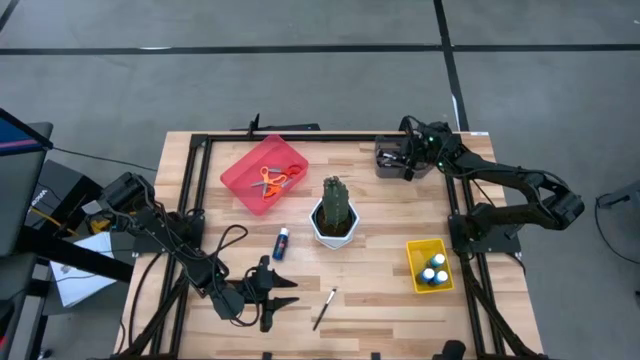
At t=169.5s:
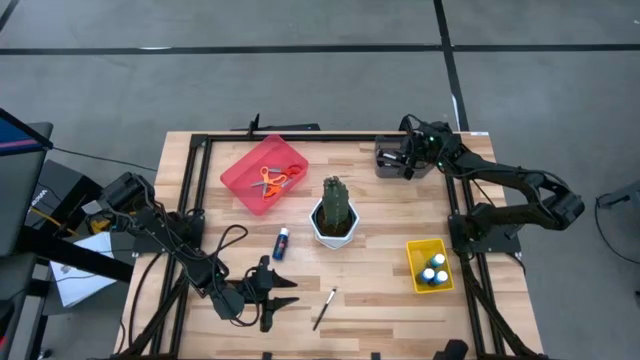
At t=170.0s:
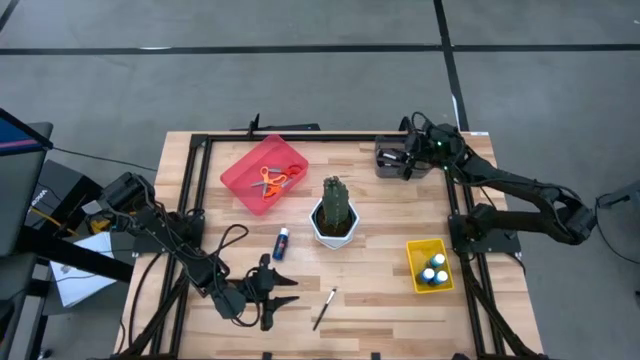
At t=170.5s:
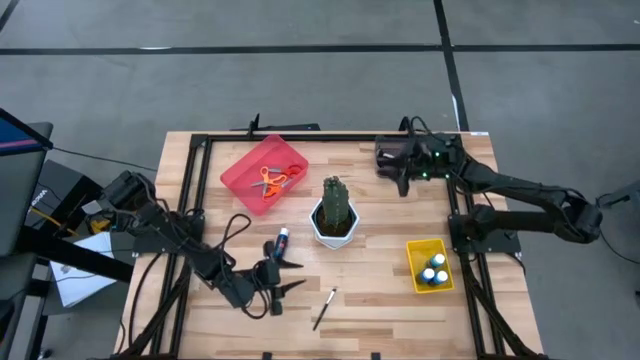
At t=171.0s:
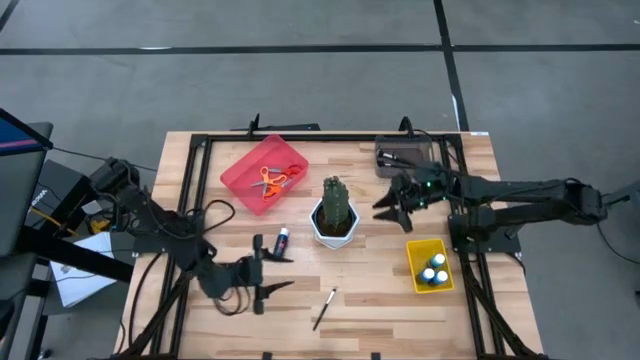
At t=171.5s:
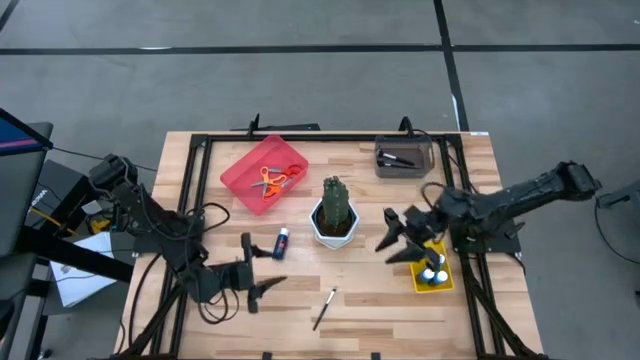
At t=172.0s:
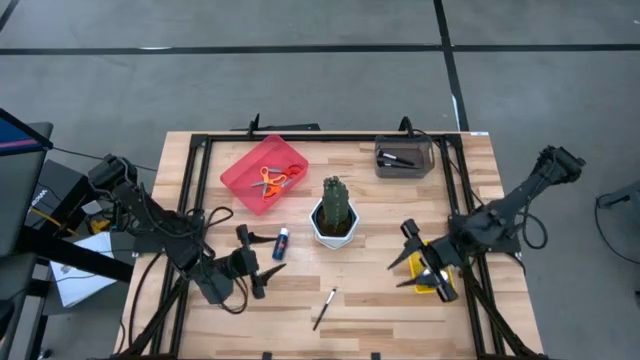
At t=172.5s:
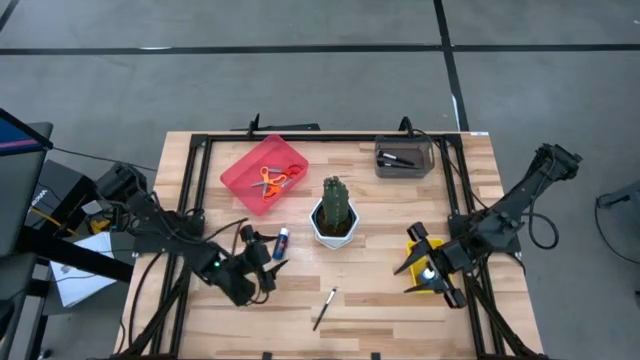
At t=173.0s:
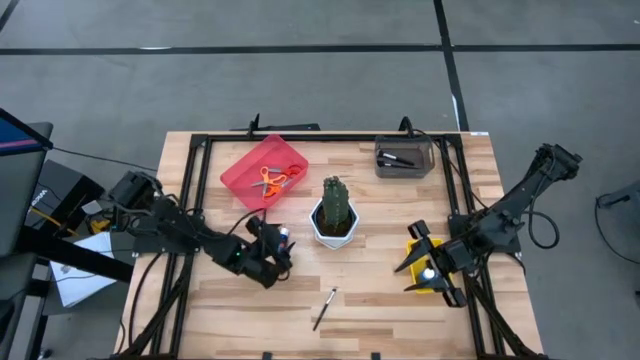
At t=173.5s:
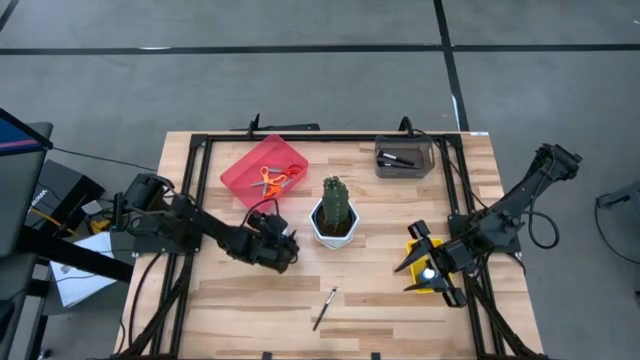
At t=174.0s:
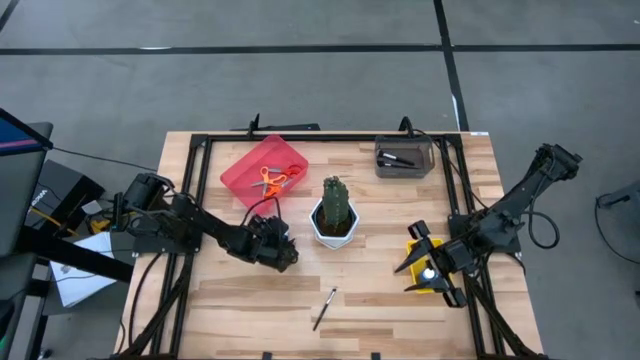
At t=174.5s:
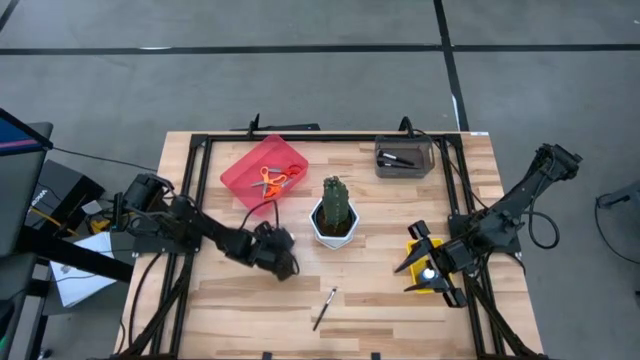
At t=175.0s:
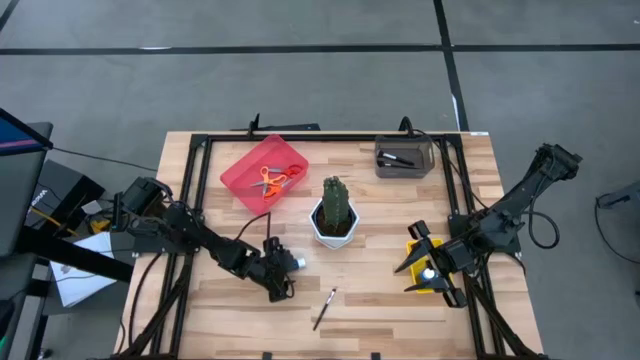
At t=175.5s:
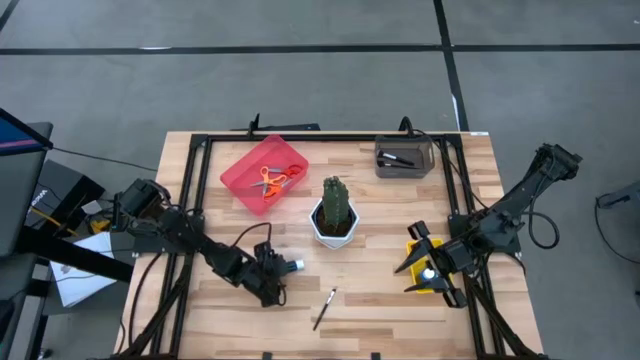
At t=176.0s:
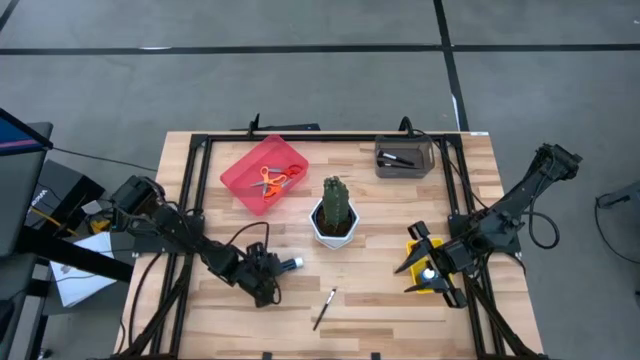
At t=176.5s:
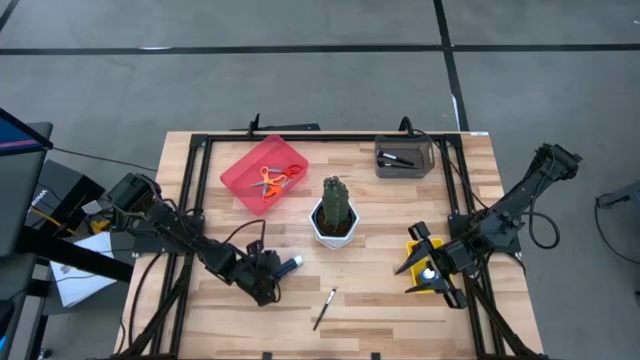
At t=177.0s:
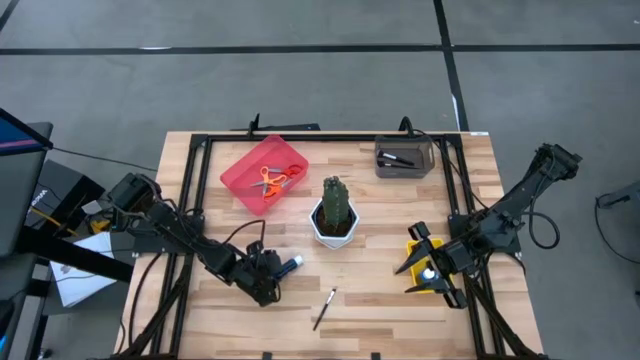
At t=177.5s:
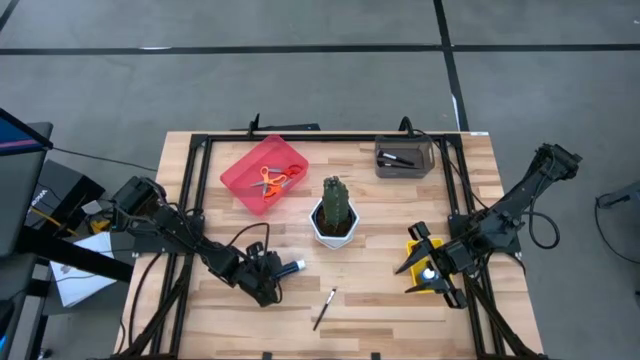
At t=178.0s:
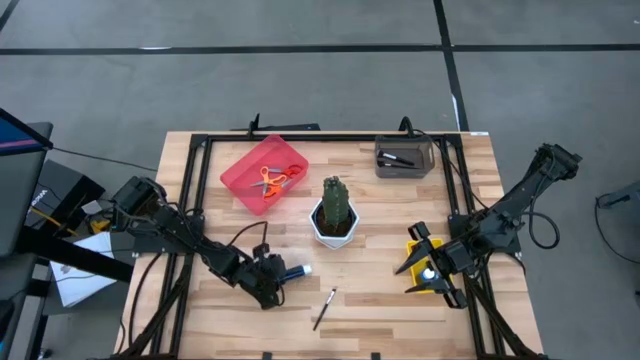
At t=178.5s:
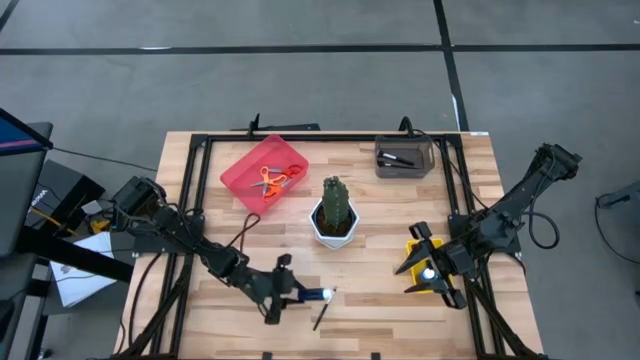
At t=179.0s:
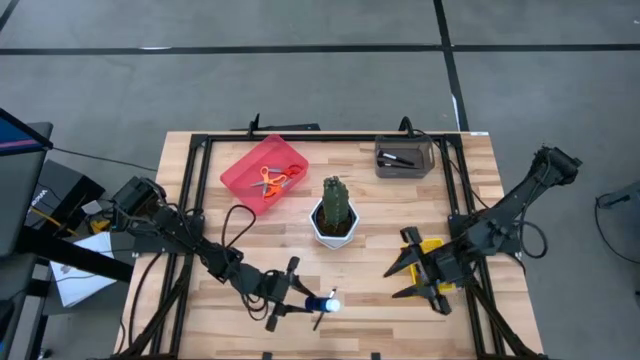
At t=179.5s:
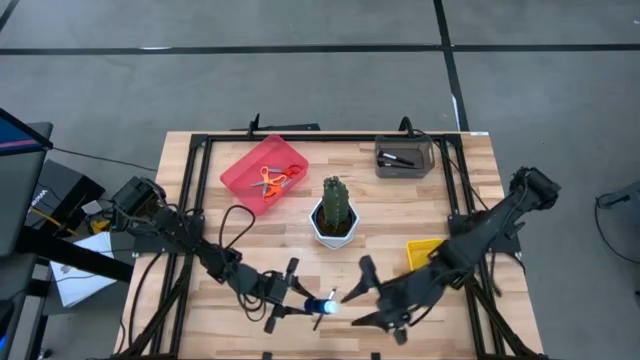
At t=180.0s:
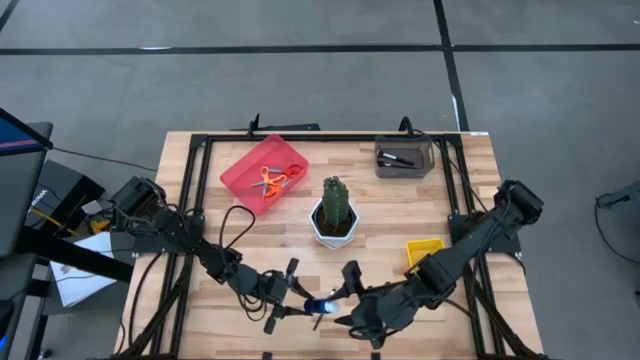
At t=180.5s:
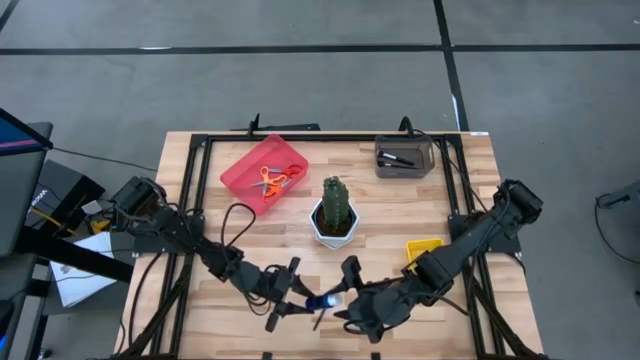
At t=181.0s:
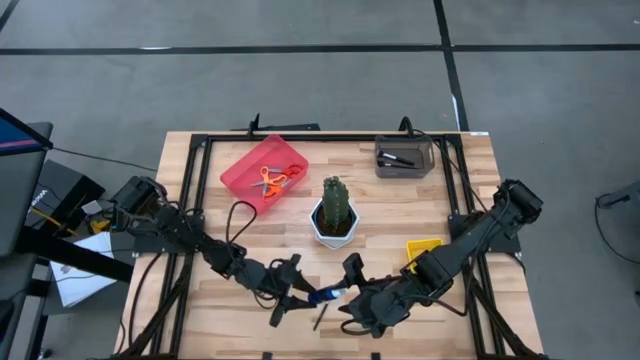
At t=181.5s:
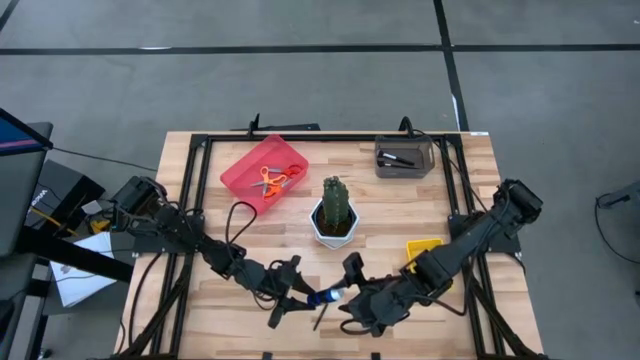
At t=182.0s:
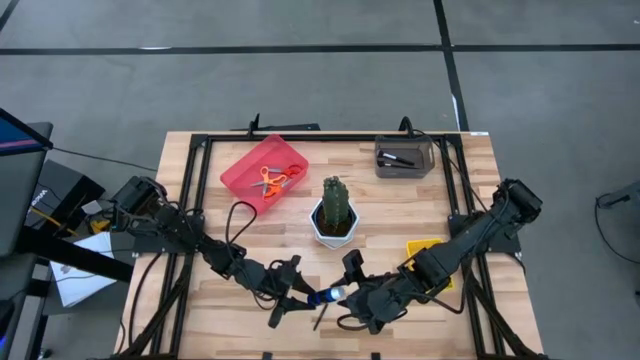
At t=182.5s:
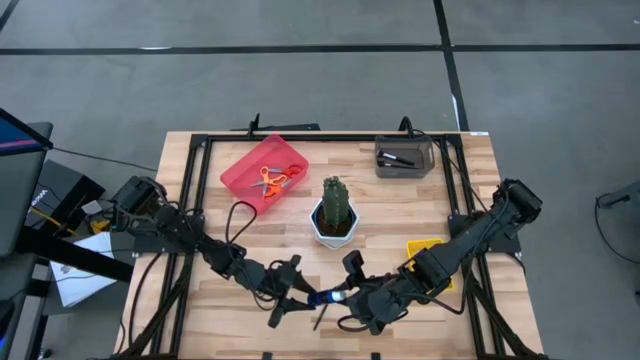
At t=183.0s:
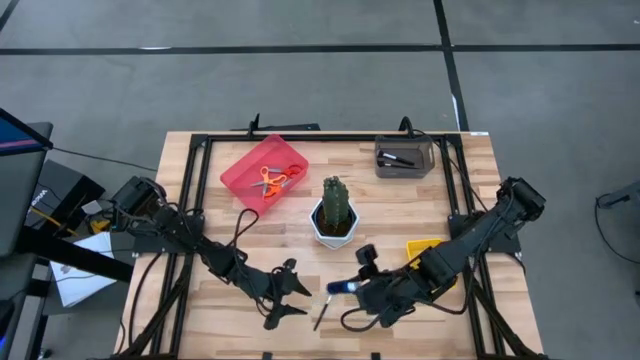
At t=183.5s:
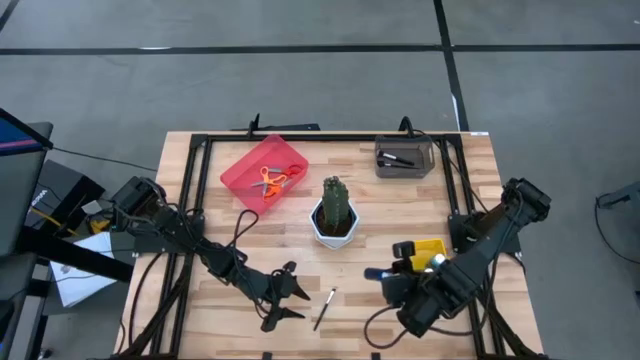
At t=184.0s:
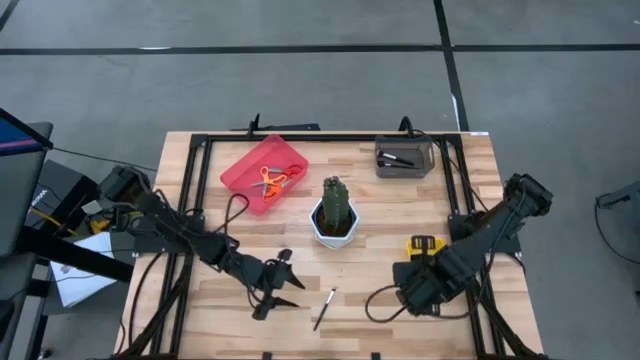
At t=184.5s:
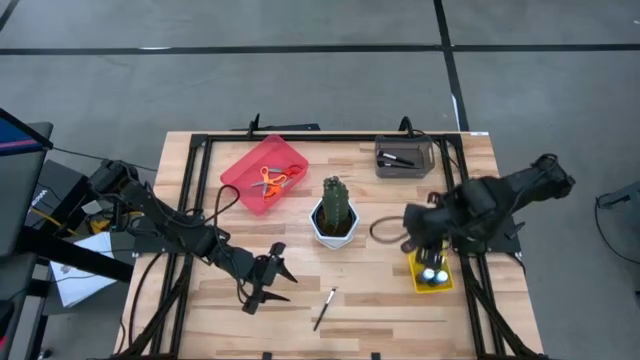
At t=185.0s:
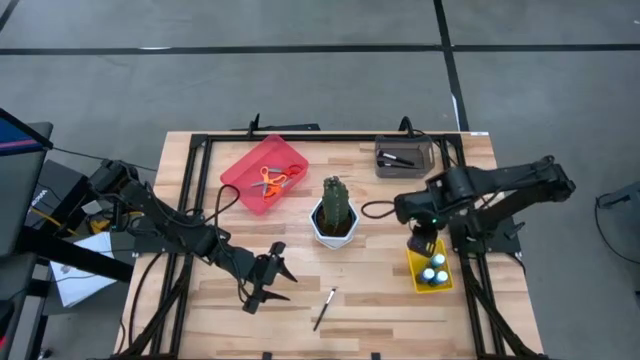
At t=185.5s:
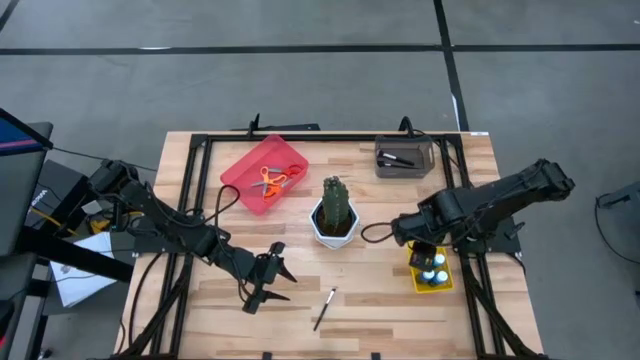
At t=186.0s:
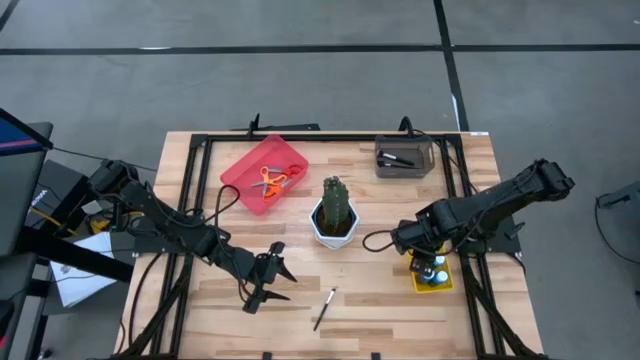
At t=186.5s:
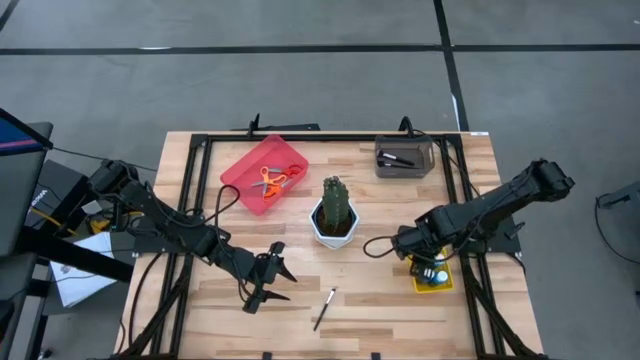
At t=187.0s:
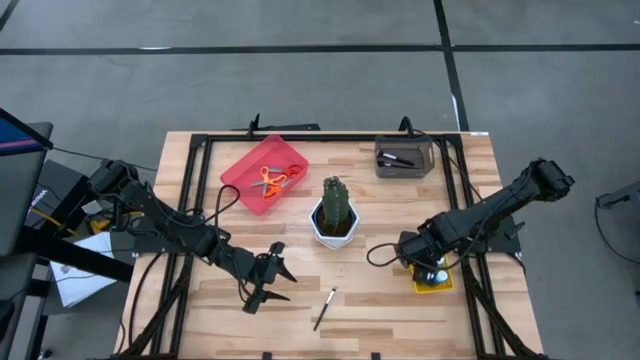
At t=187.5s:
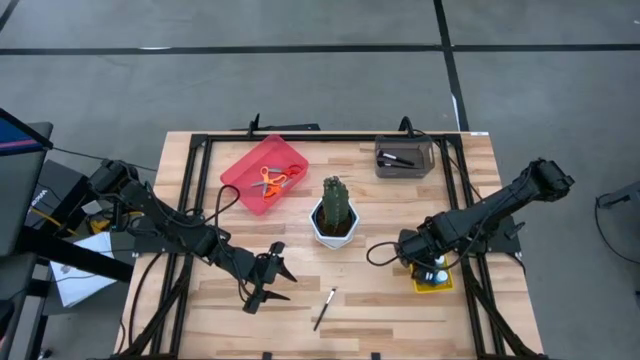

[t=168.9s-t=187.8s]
Task: Pick & Place Paint Supplies
Put the blue paint bottle into the yellow bin

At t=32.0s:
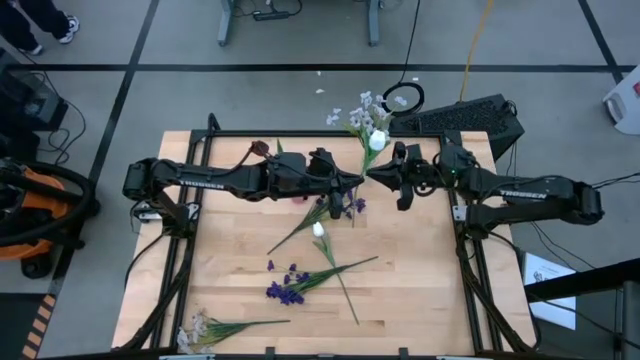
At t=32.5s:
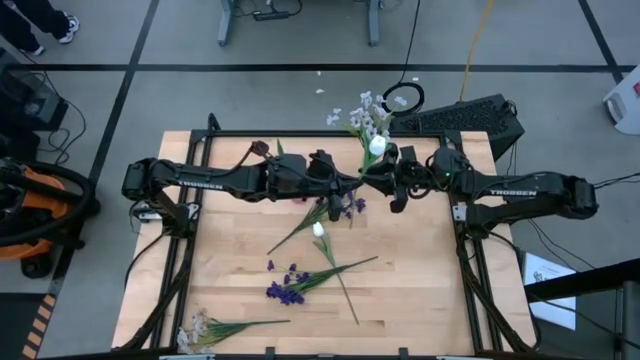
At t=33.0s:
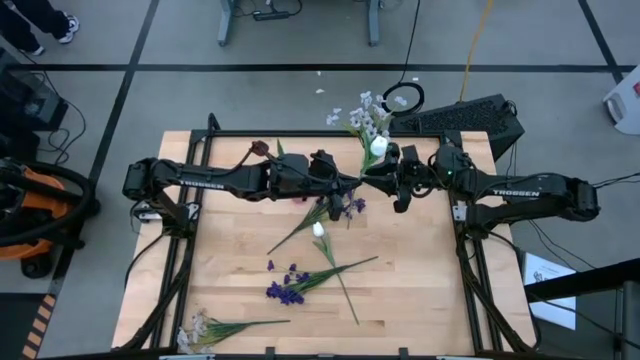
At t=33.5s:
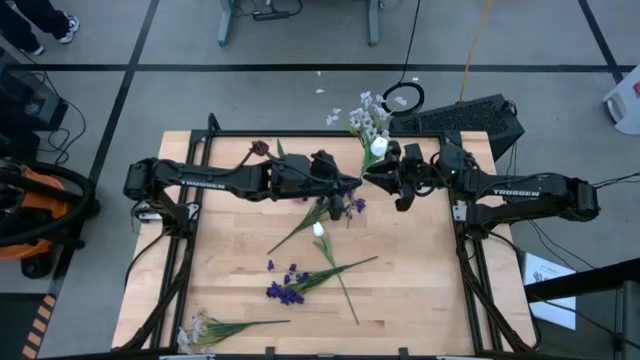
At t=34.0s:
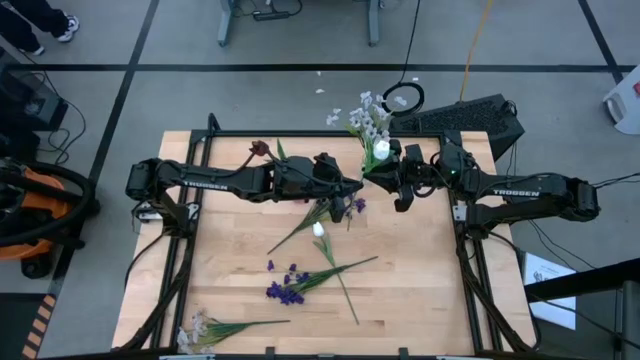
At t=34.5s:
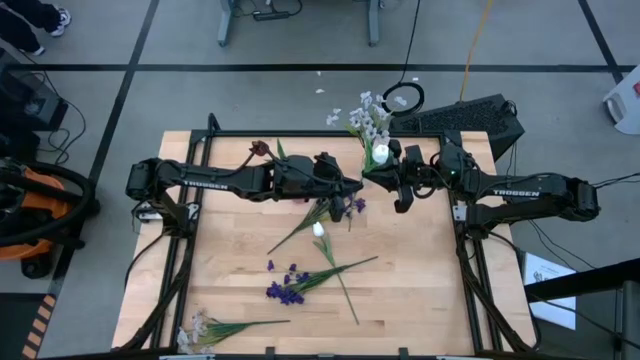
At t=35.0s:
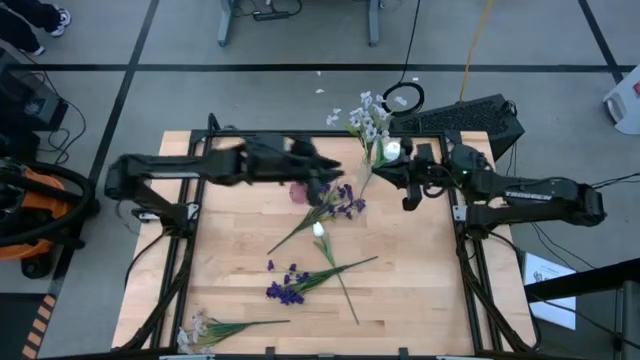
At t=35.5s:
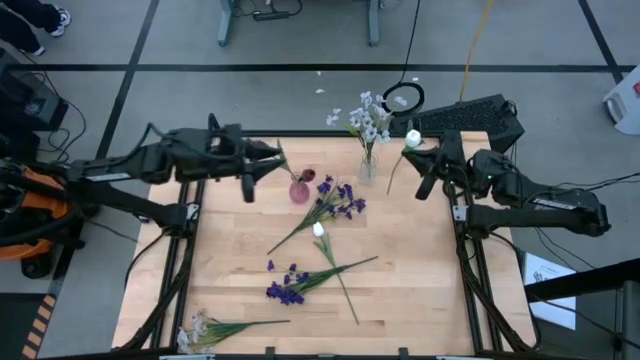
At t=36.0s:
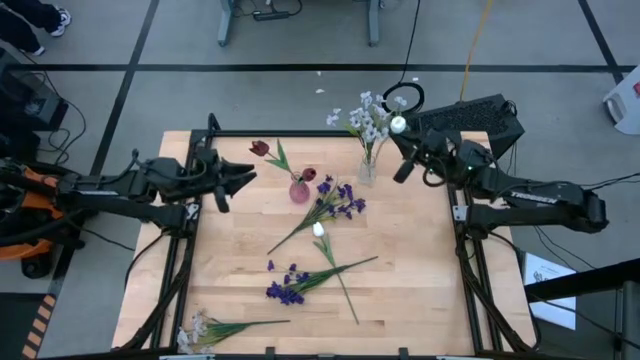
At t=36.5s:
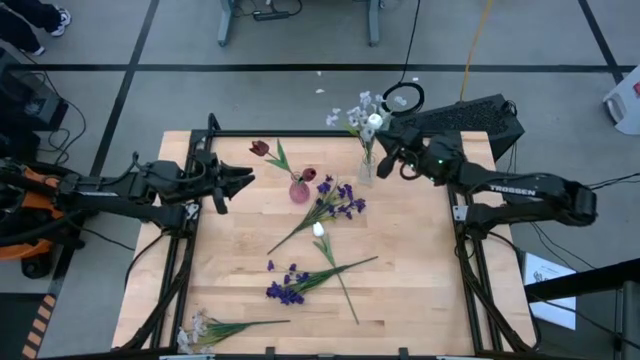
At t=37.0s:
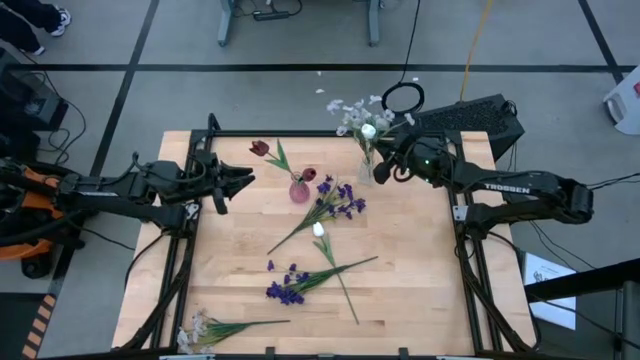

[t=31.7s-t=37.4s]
Task: Sort flowers into vase by color
Put the top white tulip flower into the transparent vase
